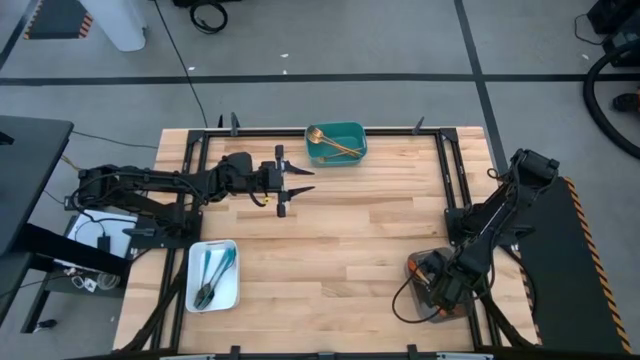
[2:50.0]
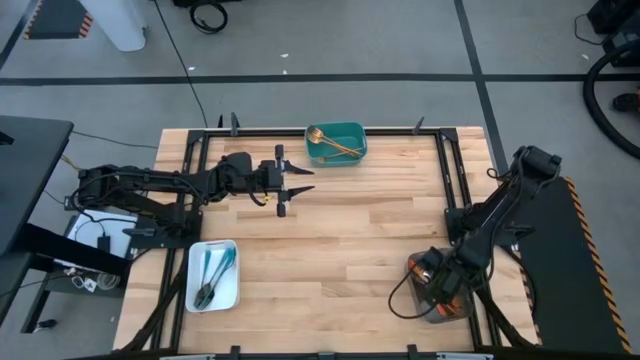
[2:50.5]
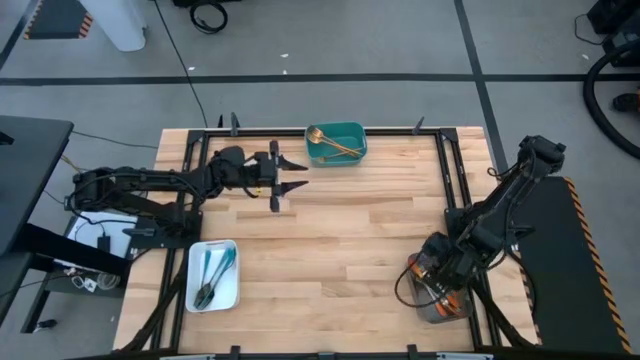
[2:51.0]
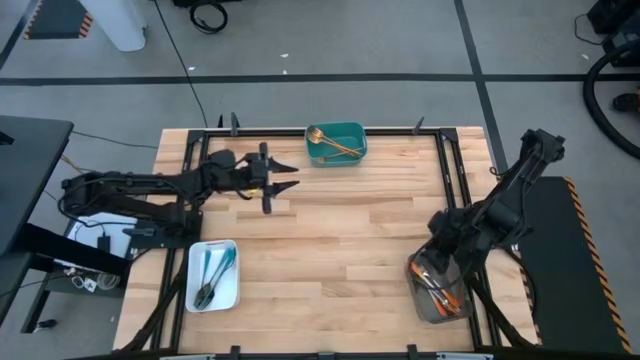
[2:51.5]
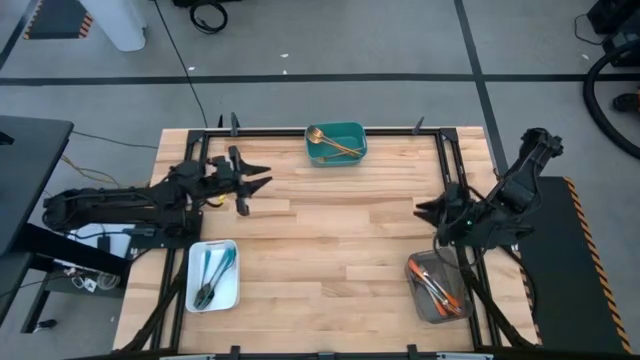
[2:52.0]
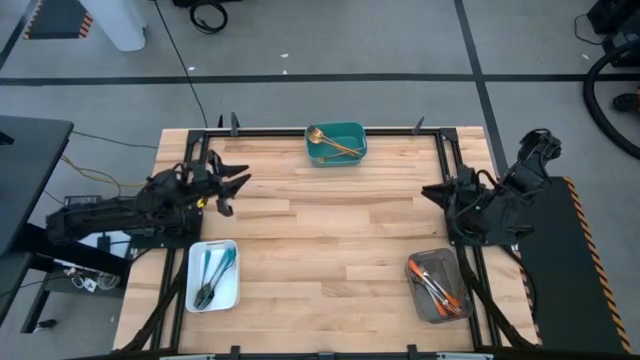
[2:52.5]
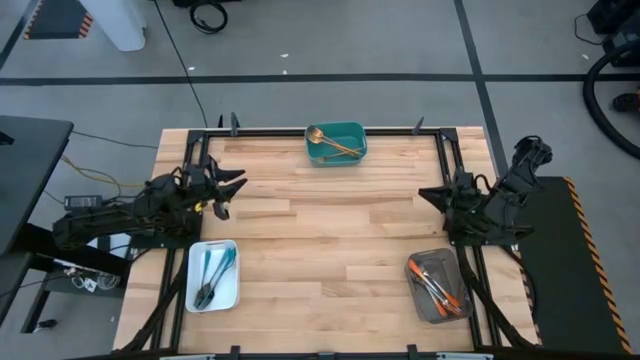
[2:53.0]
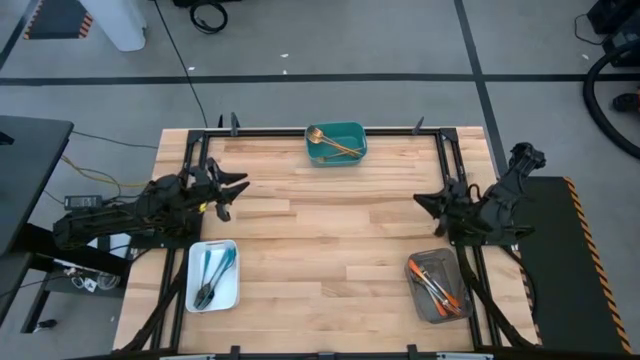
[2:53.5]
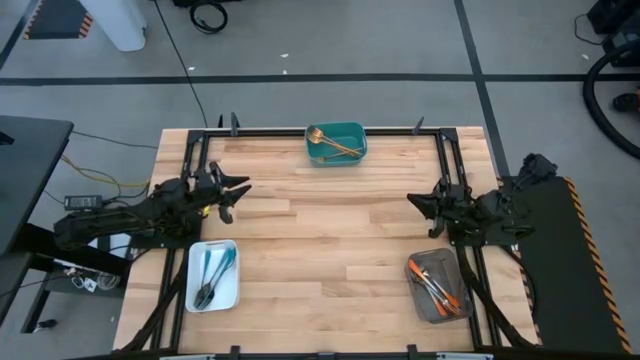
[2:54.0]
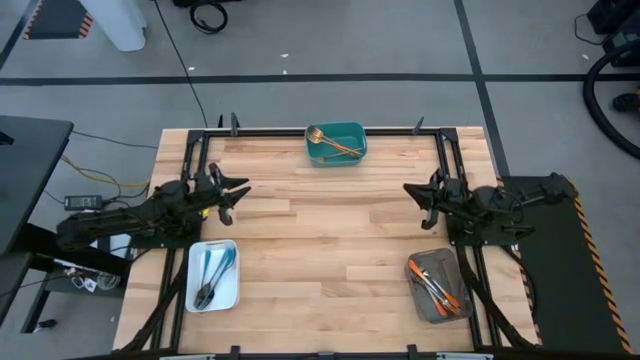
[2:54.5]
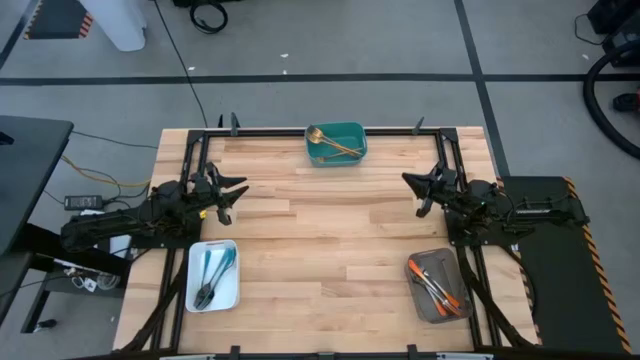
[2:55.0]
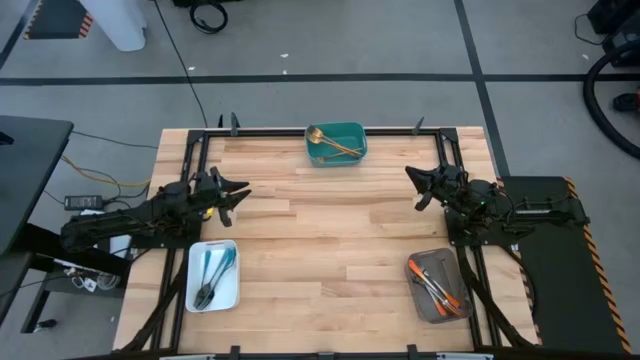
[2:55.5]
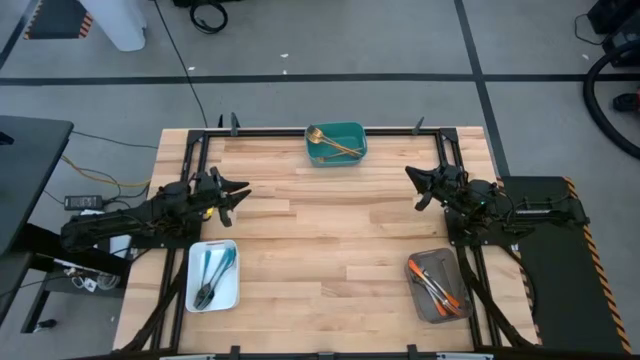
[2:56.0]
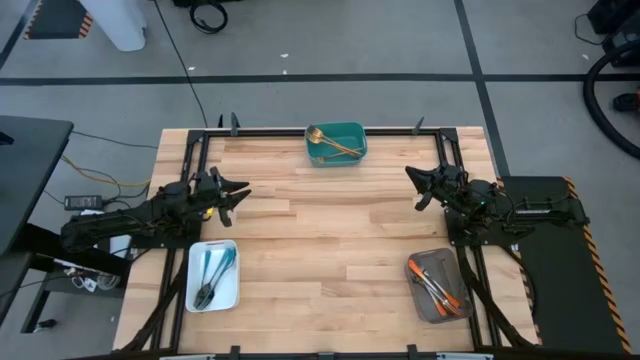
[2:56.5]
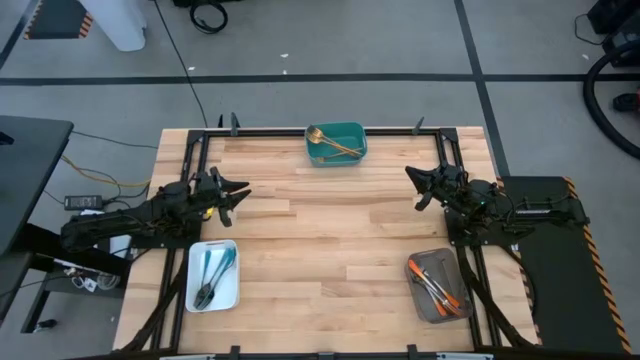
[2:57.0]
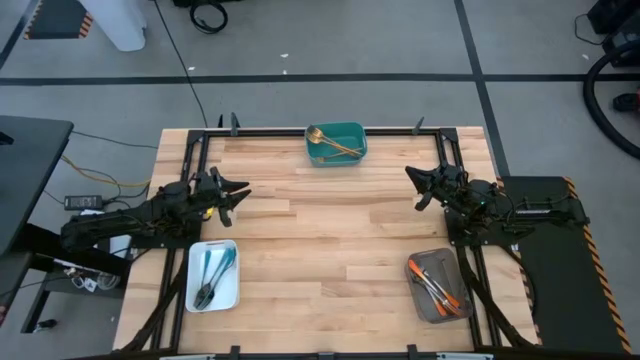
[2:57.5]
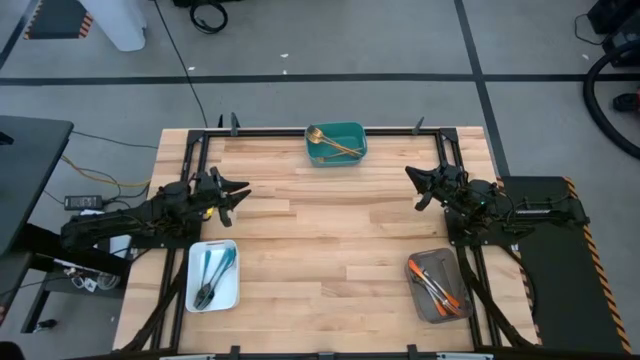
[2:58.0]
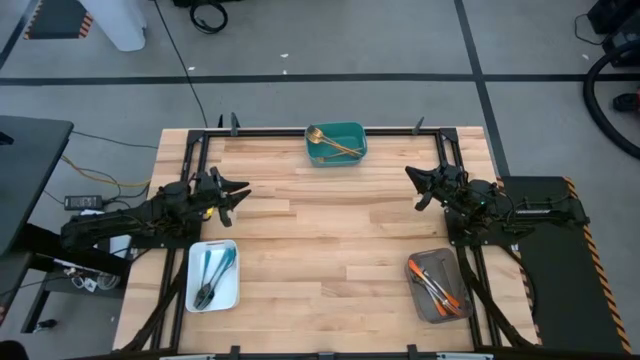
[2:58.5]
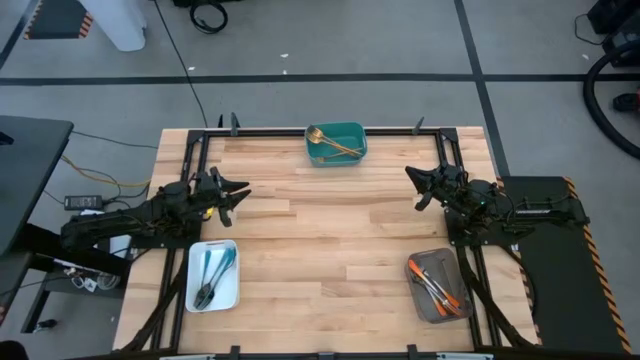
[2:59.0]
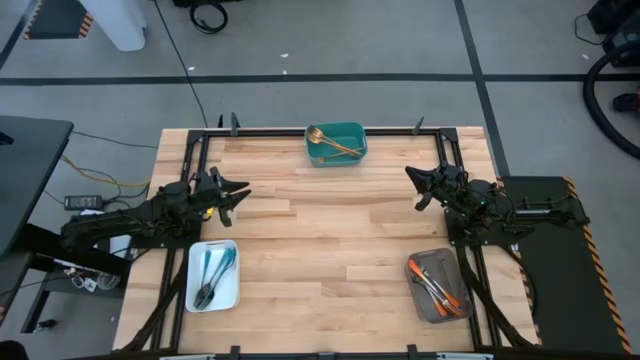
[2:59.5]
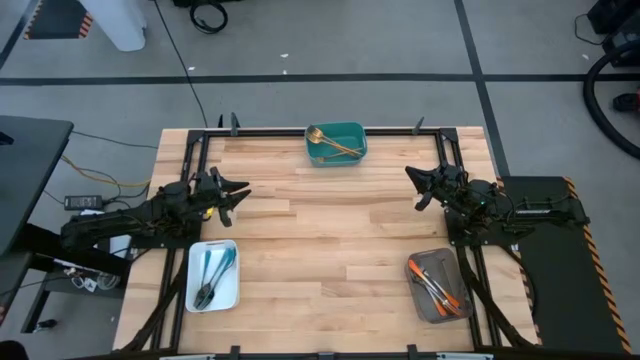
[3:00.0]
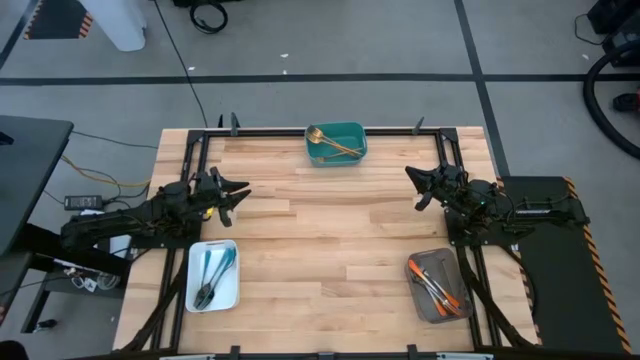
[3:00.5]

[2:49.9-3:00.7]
Task: Sort silverware by color (type)
Return to Home Position

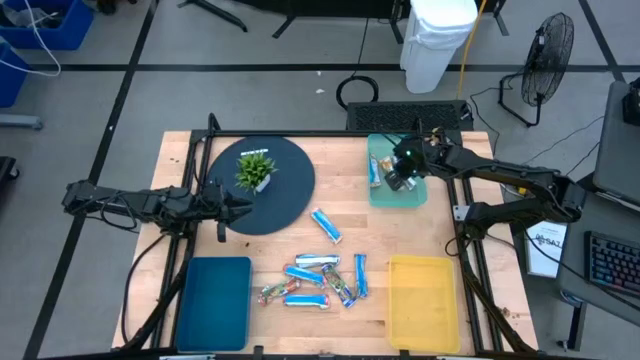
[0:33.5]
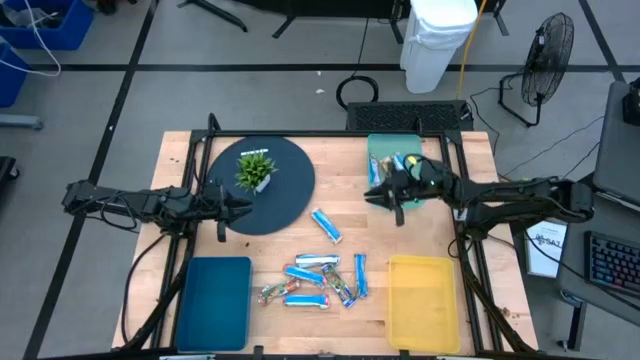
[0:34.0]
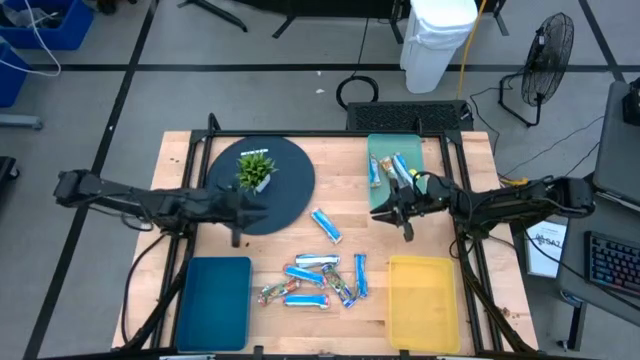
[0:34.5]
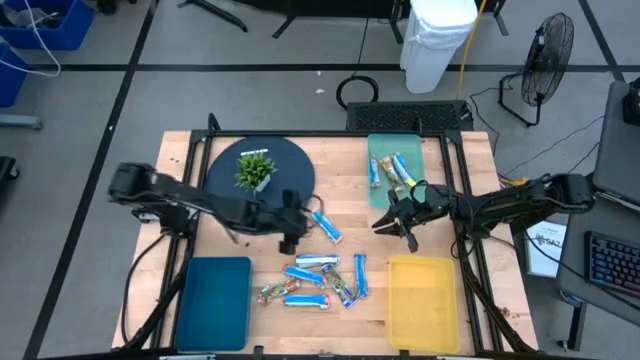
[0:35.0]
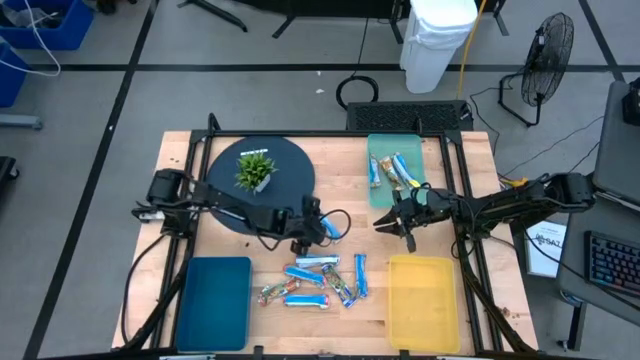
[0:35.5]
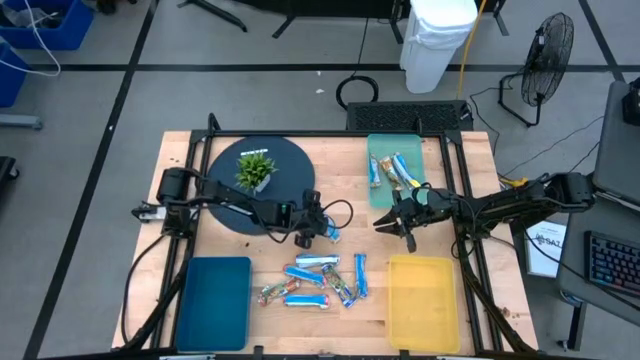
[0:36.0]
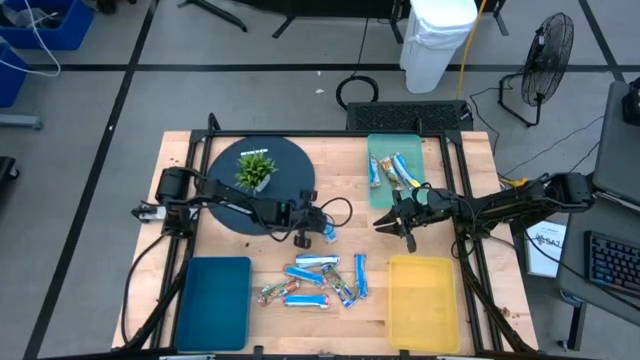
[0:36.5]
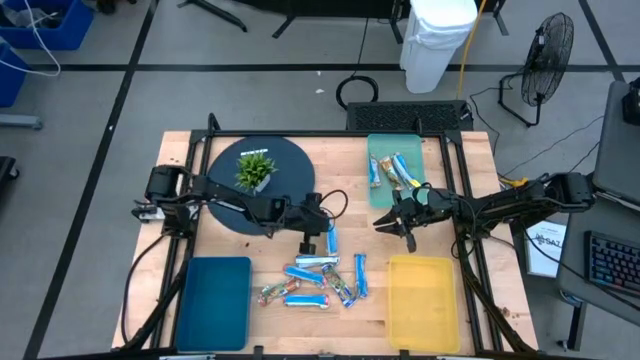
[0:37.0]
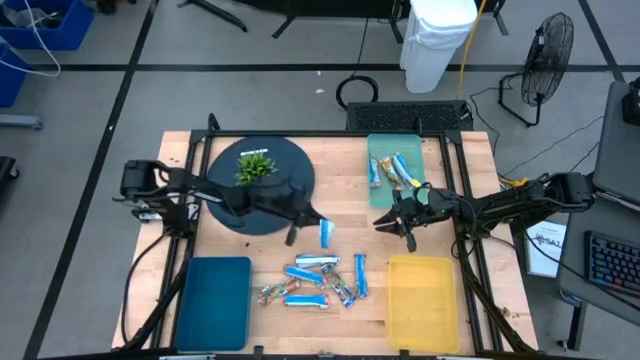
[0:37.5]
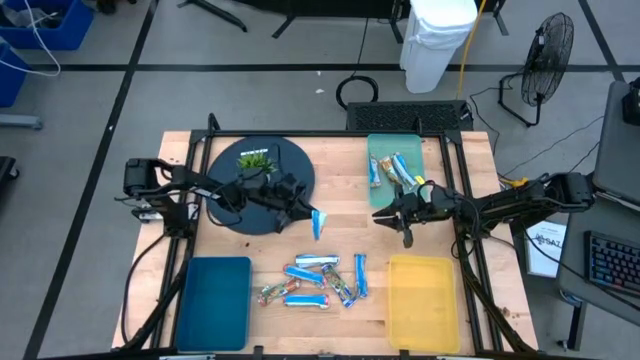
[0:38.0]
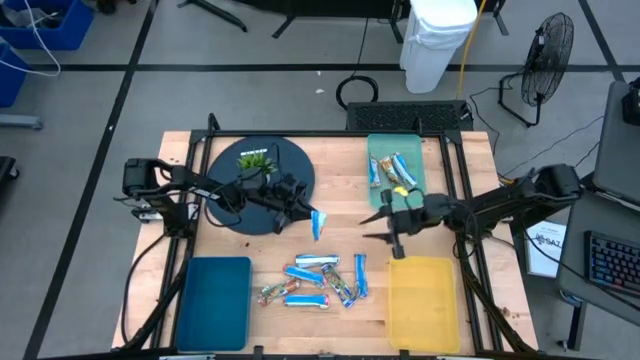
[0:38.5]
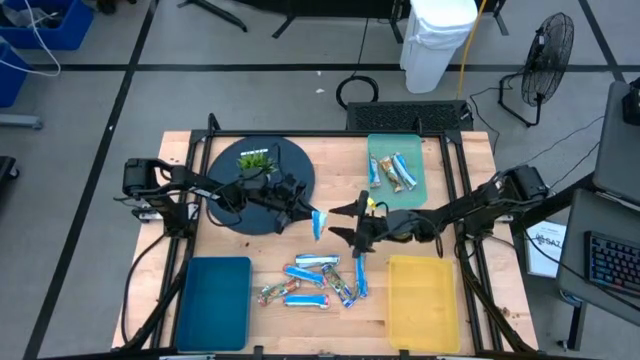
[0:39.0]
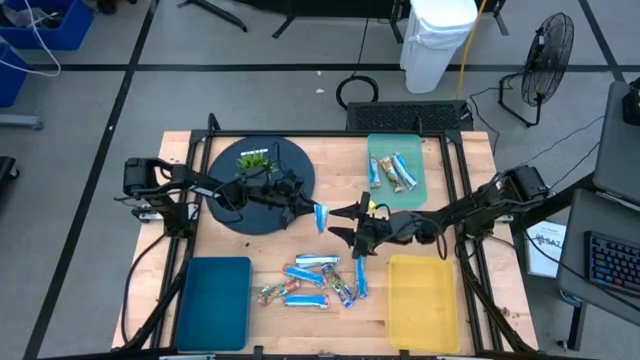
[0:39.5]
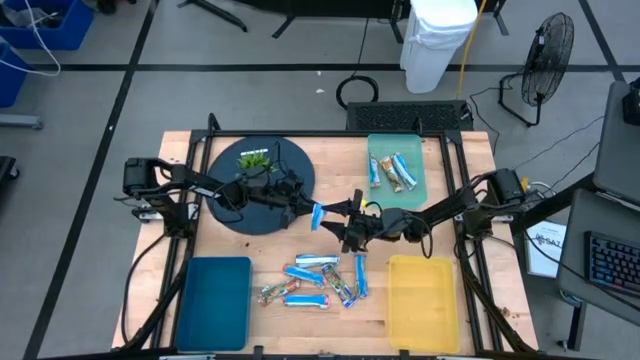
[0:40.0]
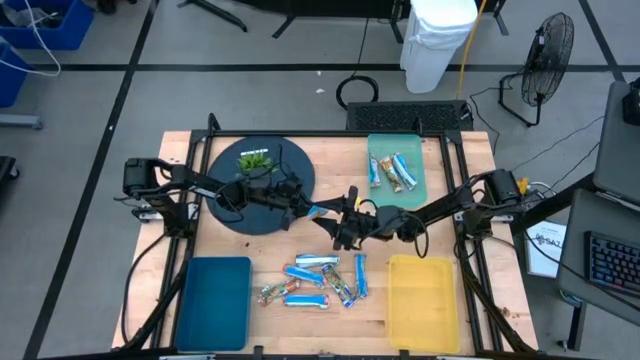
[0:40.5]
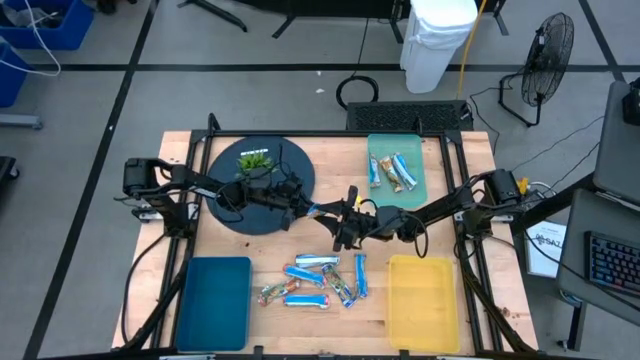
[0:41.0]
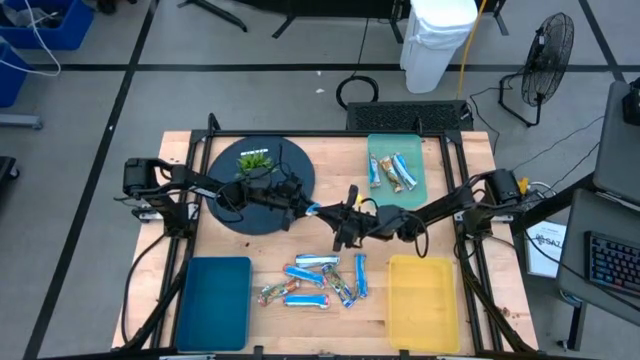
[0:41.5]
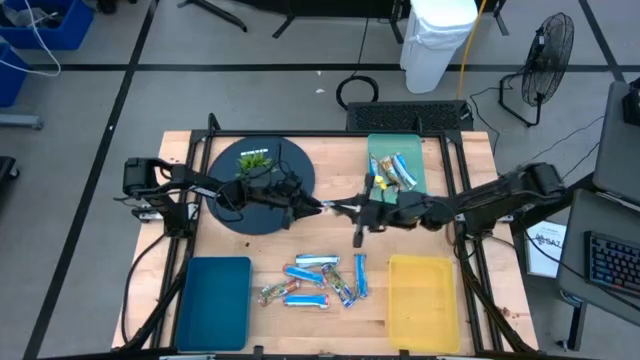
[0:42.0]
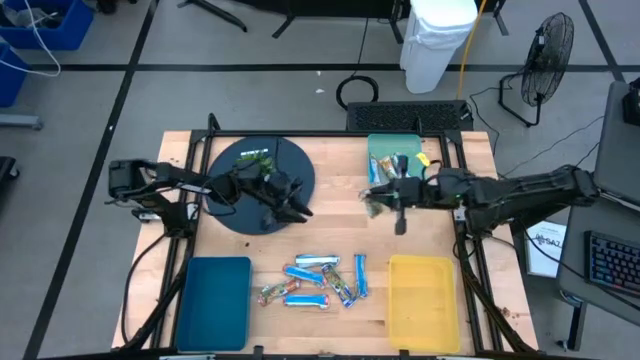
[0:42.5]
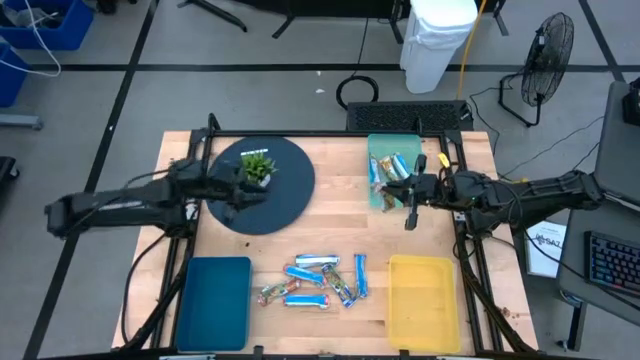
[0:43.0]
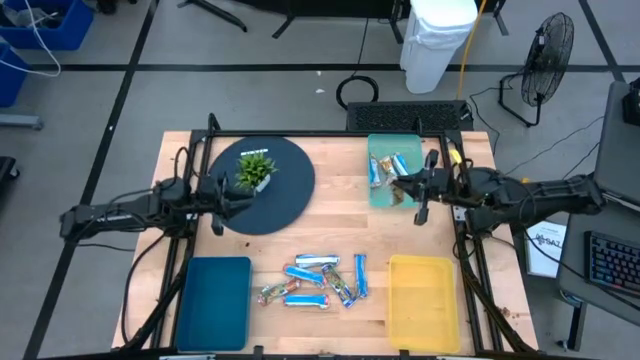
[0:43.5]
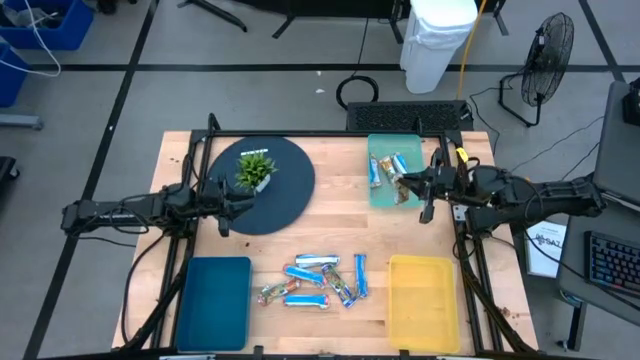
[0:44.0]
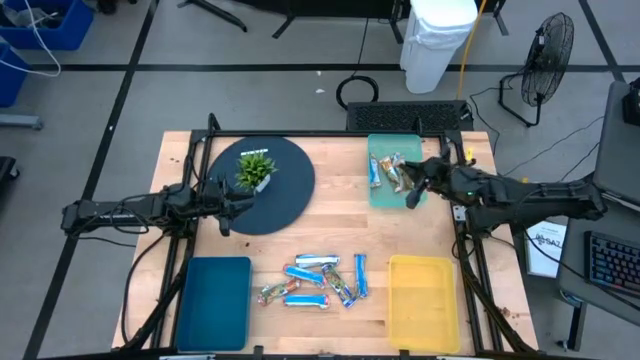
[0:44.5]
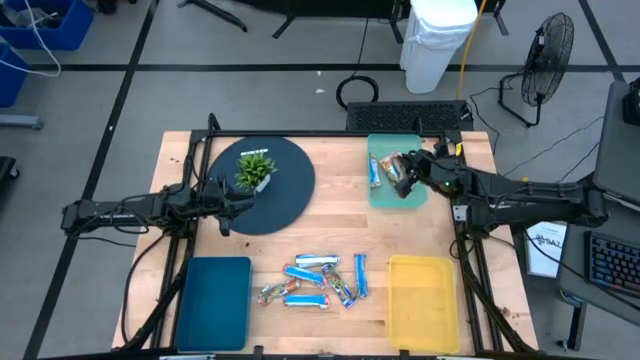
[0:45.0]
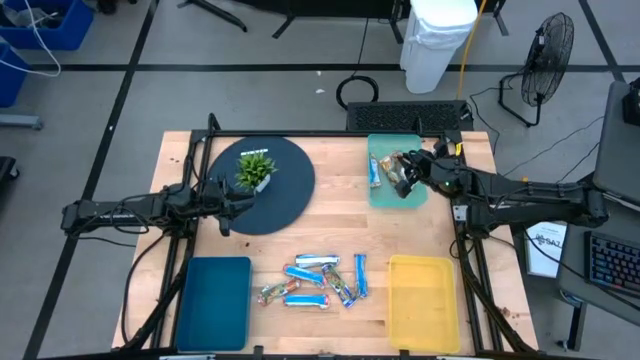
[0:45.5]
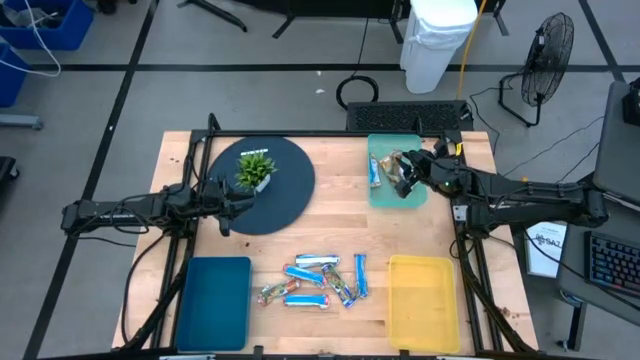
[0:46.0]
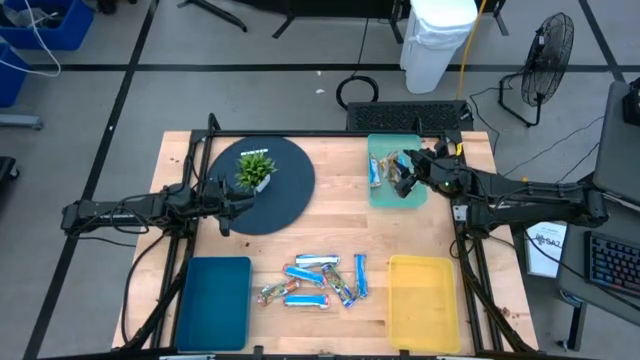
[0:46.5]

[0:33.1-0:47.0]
Task: Pick and place Granola Bars by type
Put the yellow granola bar into the green bin
